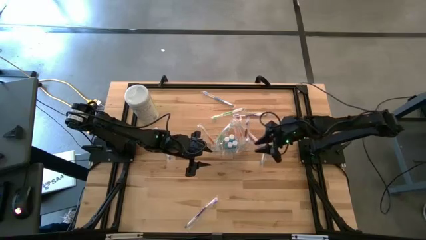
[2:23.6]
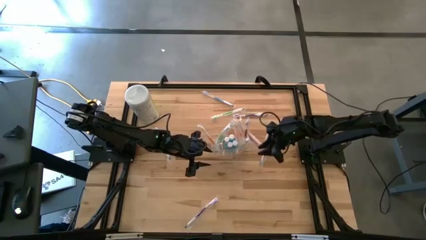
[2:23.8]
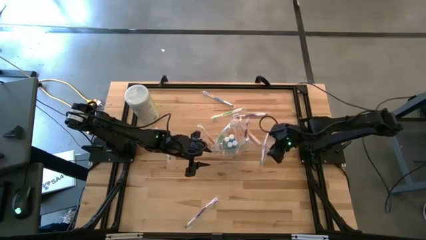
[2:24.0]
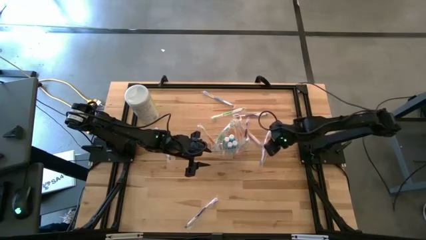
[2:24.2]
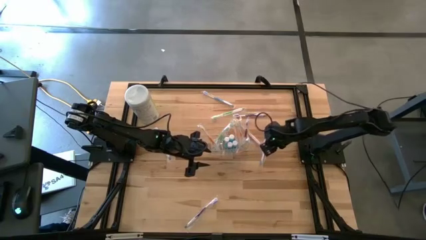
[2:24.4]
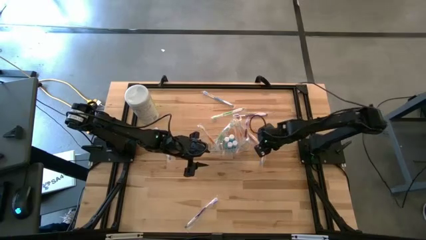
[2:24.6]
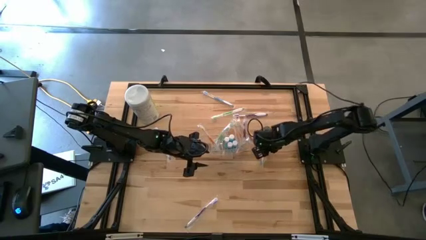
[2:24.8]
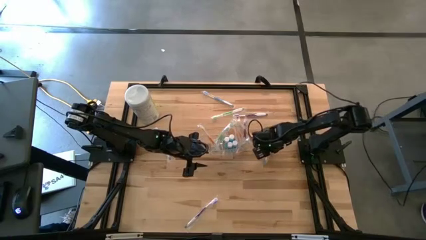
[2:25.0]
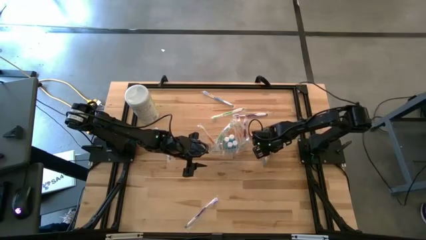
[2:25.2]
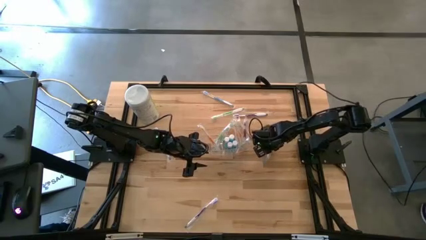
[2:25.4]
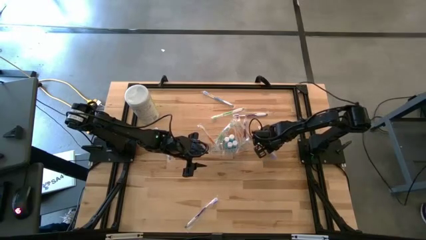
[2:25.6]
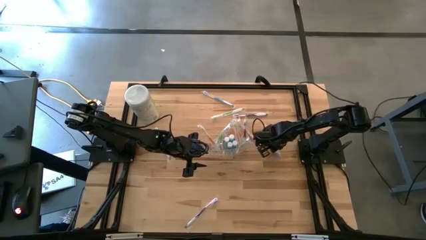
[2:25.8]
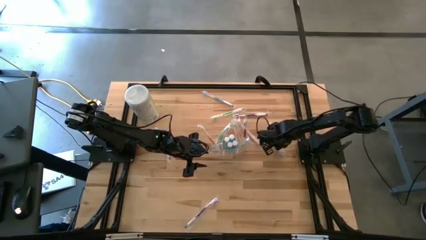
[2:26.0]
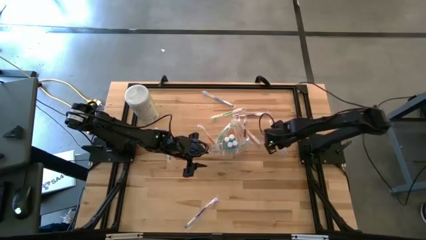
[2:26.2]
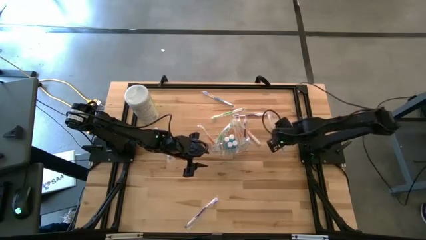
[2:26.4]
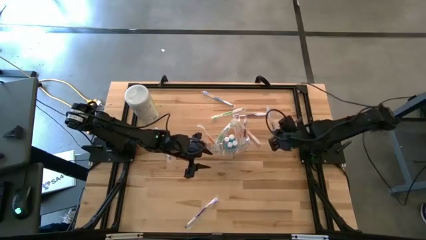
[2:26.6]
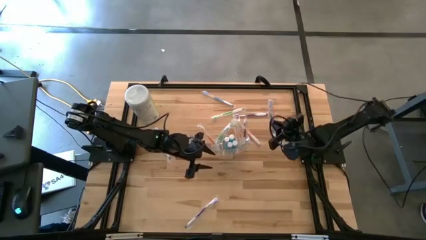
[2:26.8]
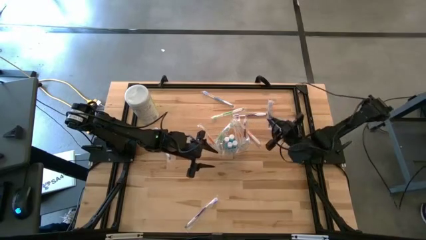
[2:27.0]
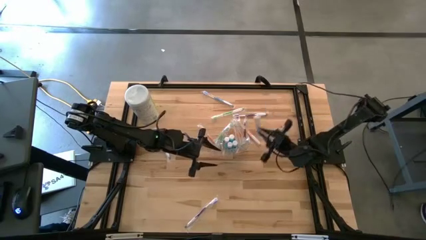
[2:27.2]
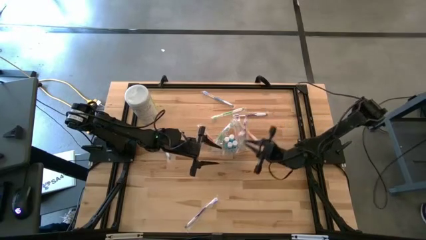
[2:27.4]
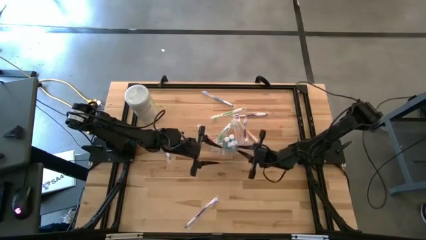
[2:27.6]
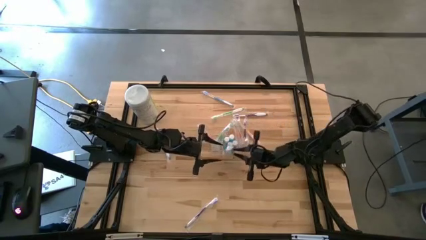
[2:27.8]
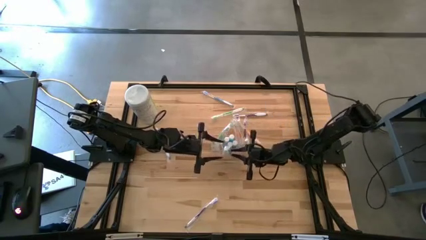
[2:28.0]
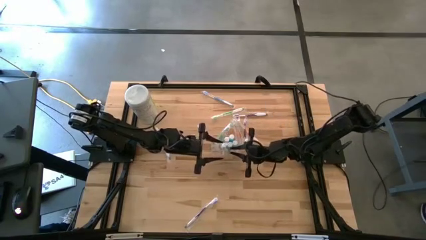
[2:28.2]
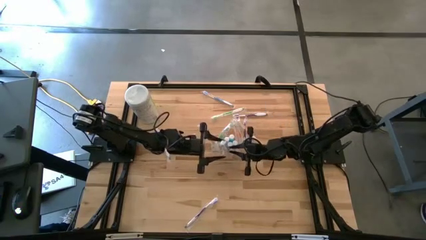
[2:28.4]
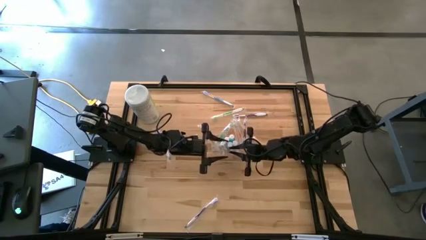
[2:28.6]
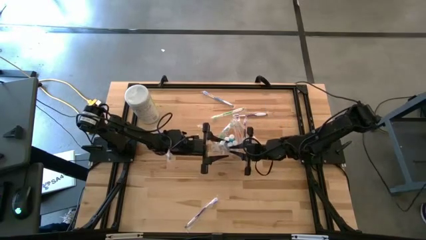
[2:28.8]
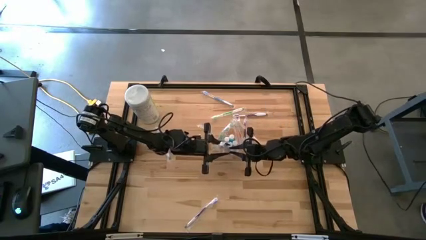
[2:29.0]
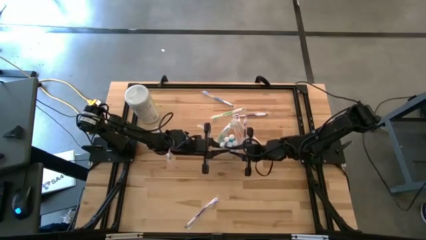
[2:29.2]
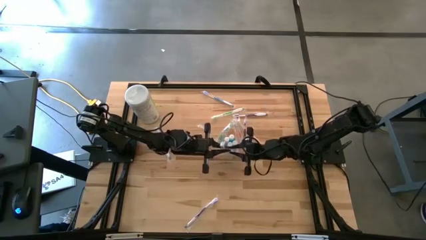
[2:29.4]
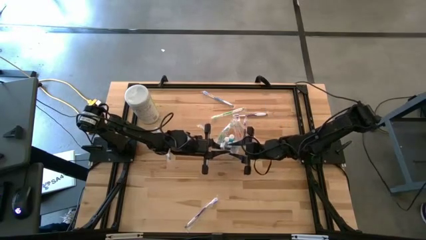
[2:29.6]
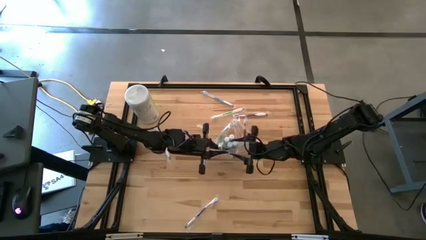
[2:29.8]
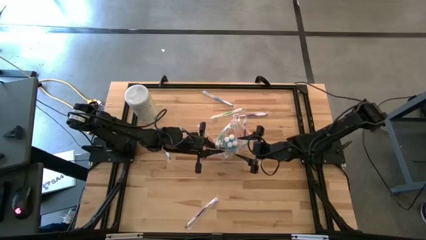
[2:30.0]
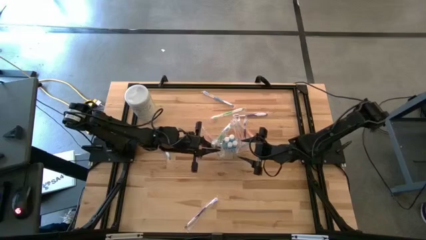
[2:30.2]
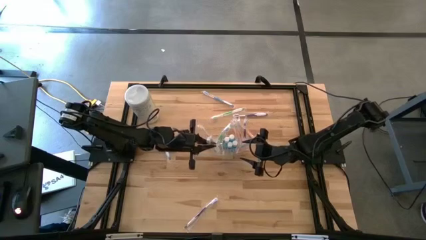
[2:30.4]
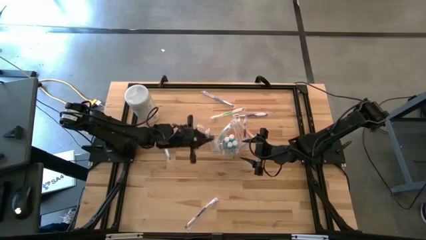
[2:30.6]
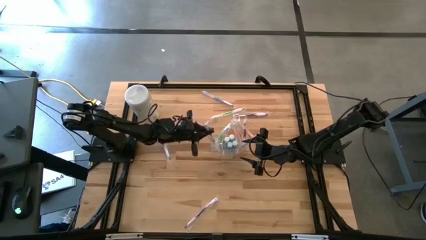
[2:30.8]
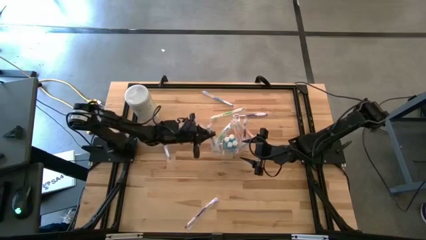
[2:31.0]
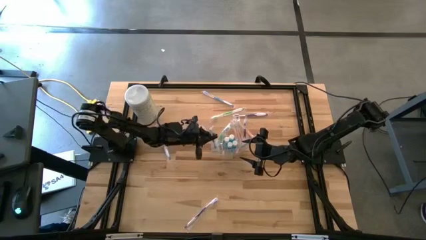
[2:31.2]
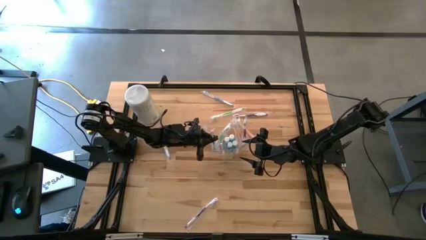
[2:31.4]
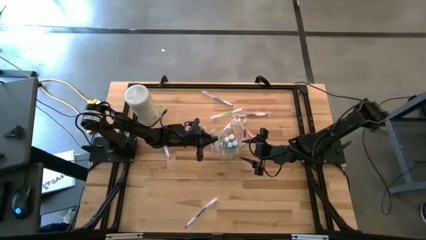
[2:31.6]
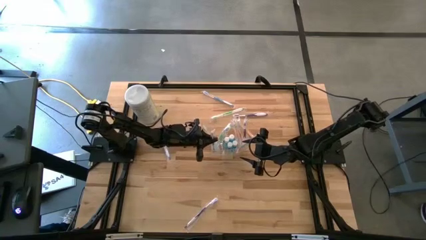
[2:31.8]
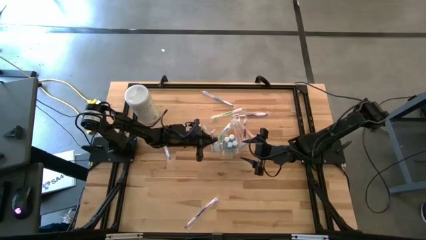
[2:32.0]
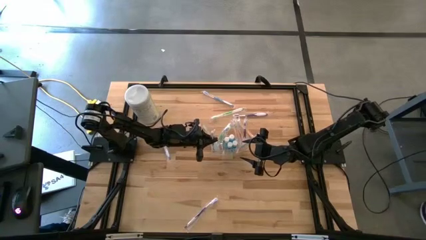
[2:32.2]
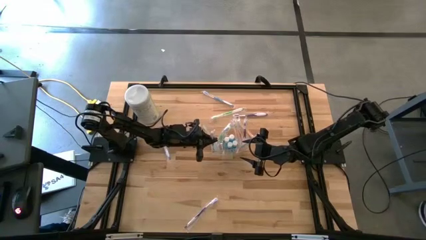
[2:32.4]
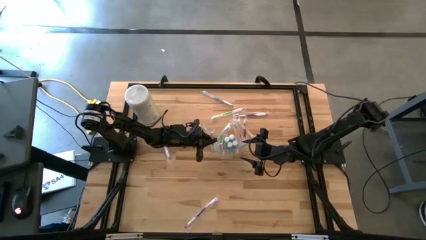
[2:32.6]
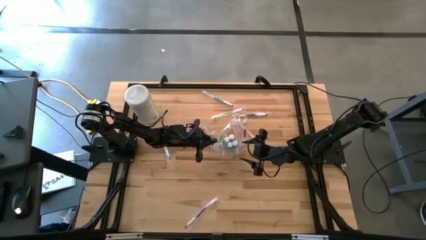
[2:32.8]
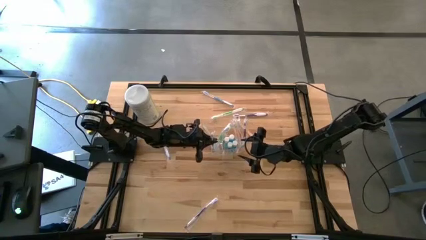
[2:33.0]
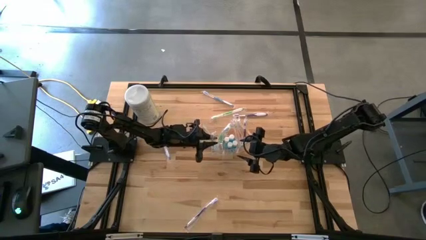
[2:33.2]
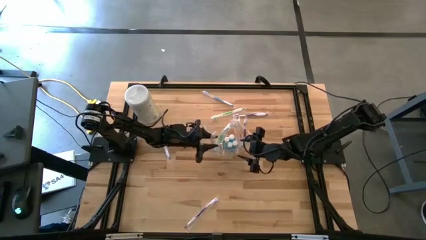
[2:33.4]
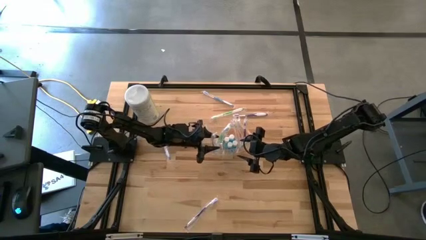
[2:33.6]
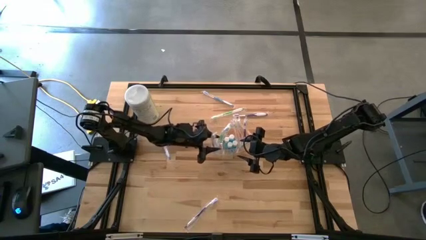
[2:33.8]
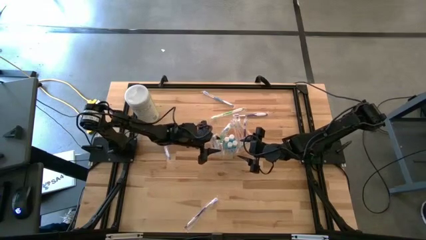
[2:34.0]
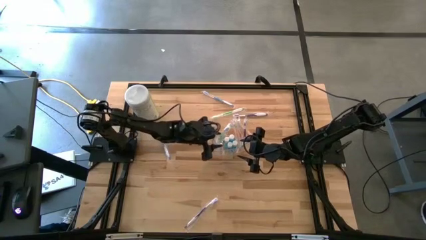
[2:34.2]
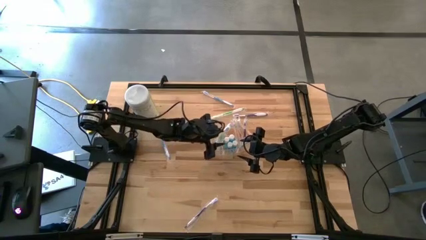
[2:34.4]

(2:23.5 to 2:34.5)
Task: Pick & Place toothbrushing station
Put the blue toothbrush into the transparent organizer

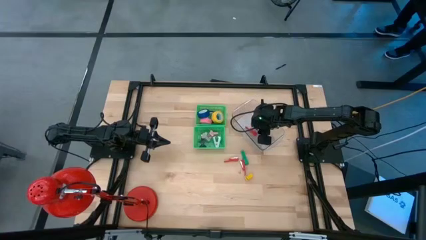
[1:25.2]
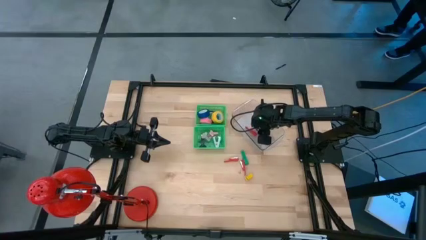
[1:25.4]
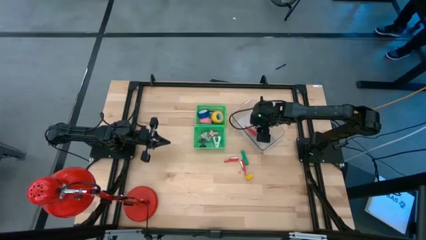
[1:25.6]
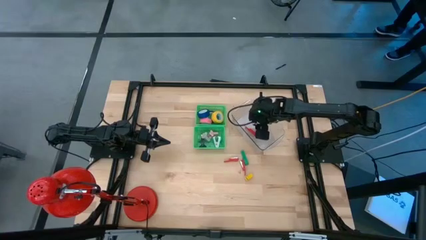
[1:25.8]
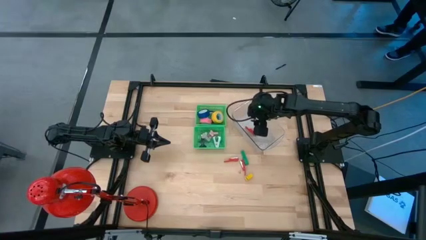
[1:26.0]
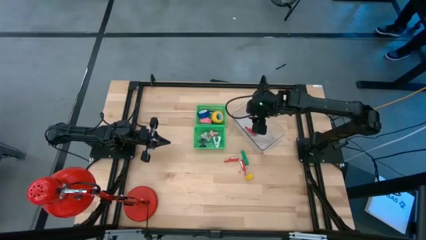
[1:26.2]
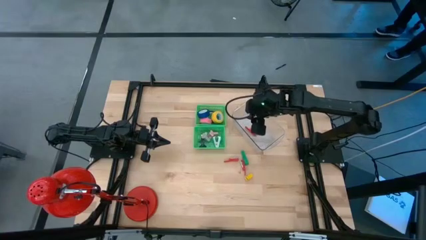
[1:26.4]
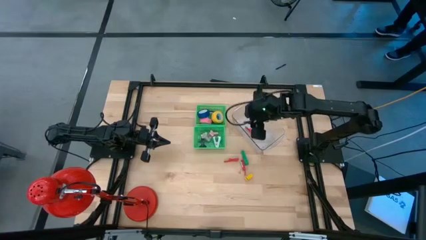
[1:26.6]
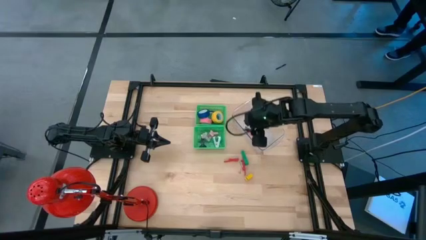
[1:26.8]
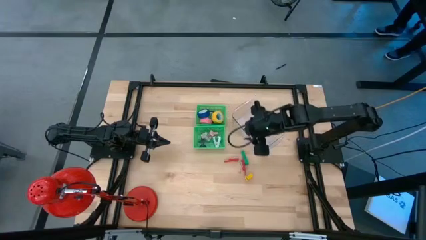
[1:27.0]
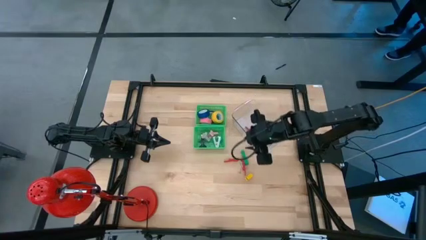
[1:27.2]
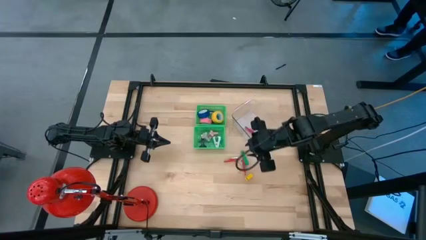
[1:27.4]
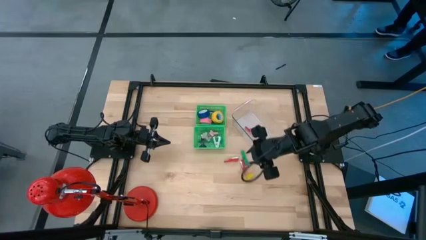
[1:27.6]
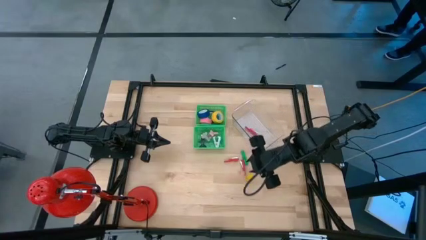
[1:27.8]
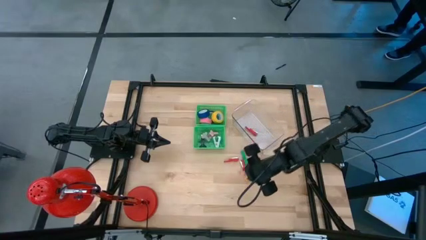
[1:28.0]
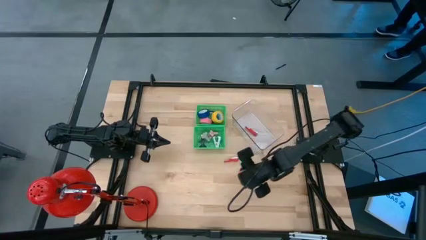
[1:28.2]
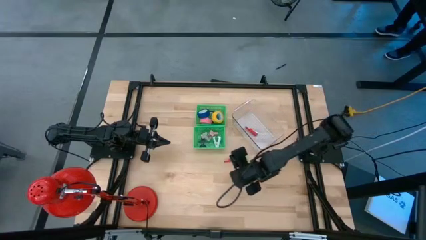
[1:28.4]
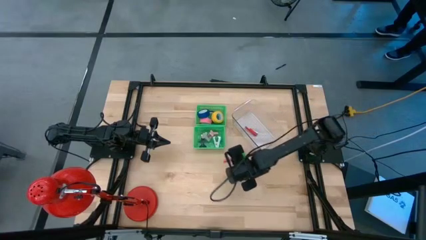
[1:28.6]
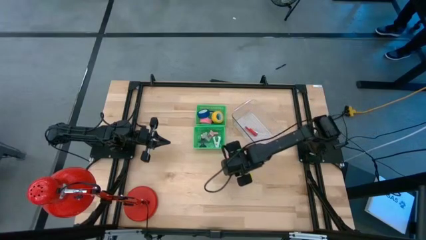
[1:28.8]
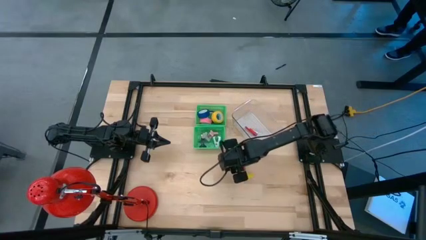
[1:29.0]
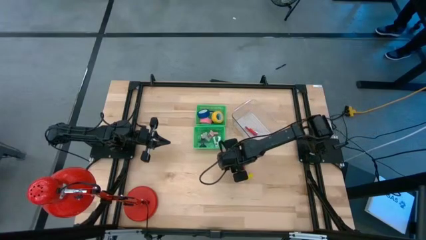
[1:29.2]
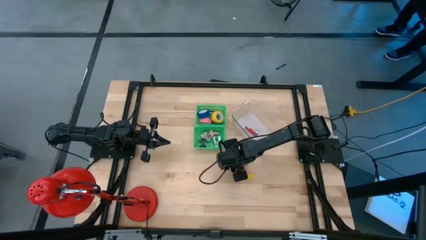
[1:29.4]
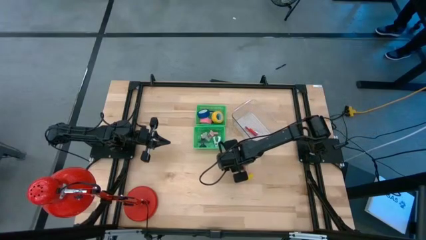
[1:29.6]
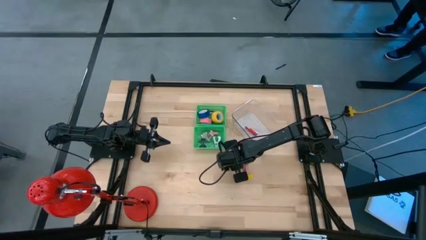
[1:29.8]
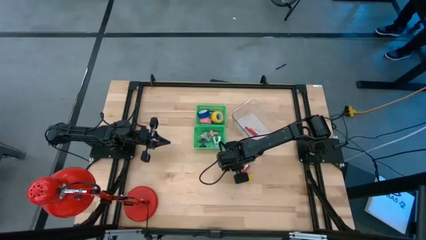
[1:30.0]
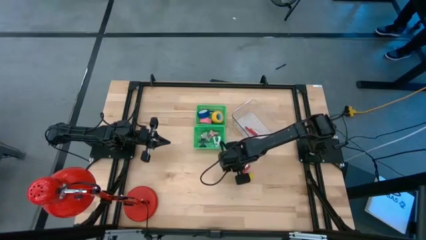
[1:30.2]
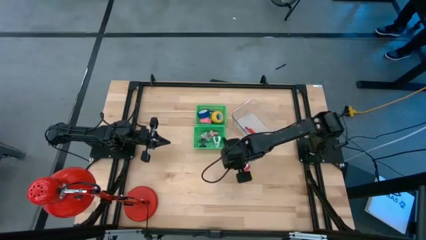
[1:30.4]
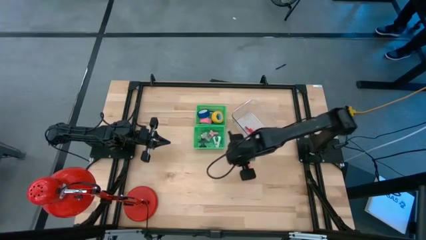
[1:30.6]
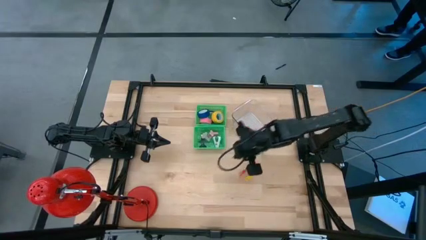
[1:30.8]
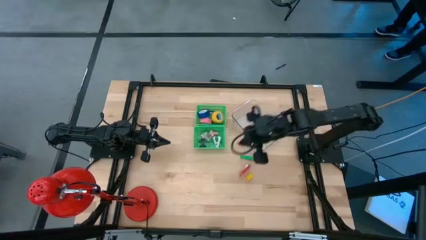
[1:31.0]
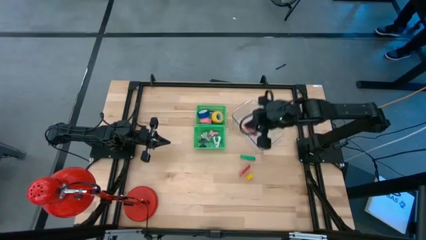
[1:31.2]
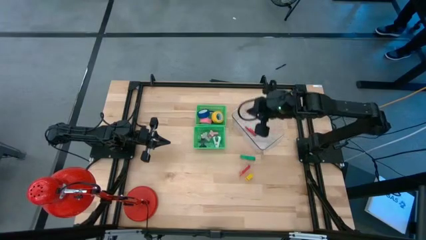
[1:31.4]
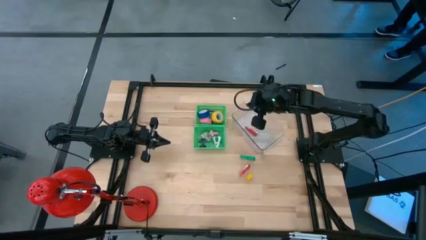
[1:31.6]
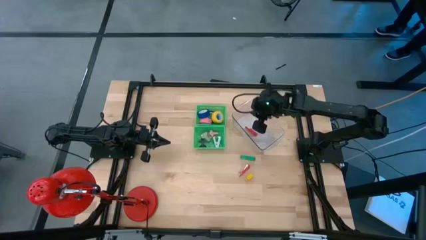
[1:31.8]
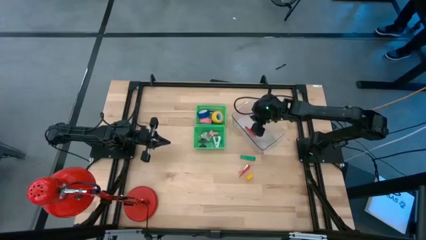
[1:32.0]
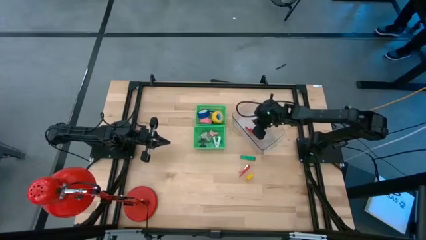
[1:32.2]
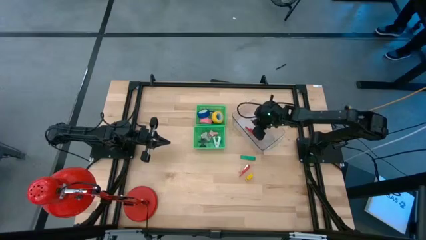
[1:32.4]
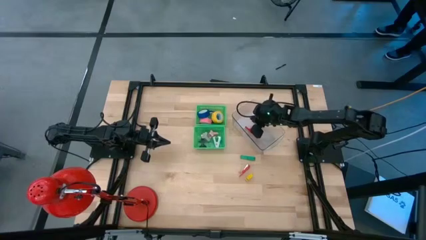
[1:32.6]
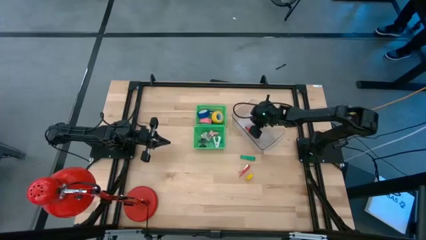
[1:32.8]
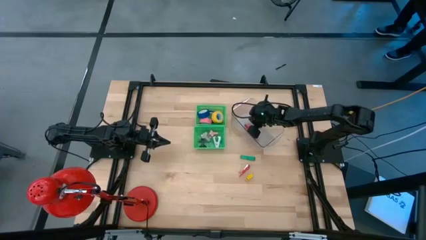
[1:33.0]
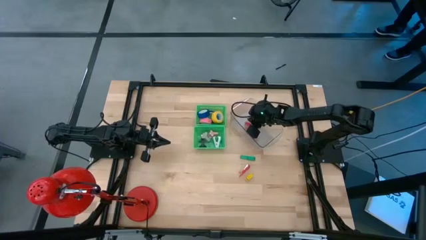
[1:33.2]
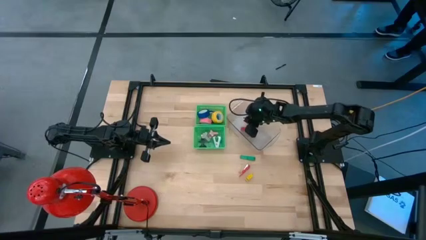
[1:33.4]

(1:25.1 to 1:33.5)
Task: Pick and place Stapler, Stapler remover, tape
Put the top red stapler into the transparent bin
